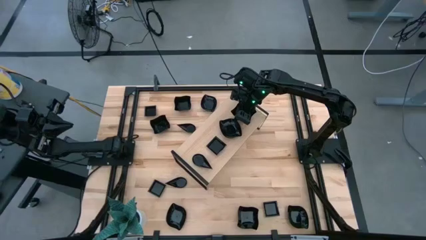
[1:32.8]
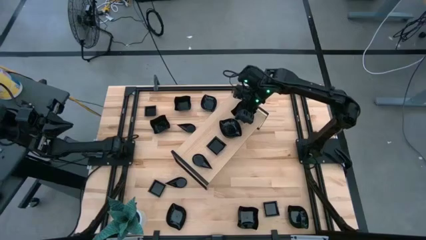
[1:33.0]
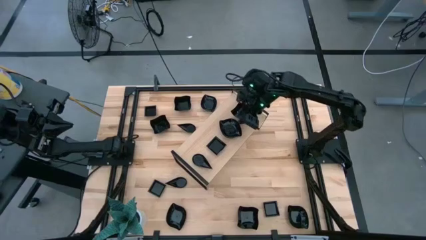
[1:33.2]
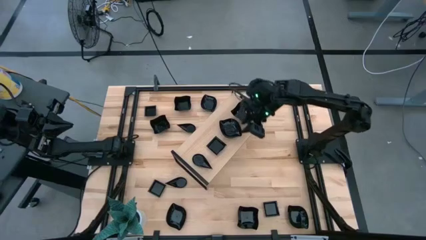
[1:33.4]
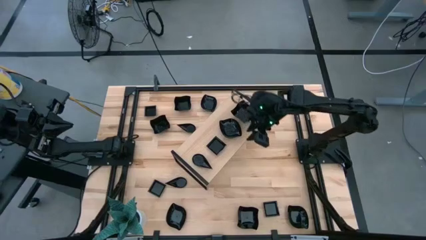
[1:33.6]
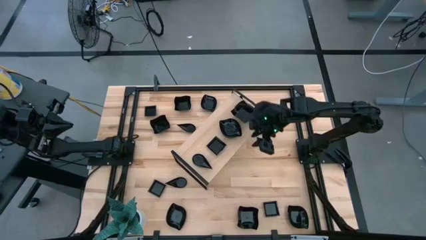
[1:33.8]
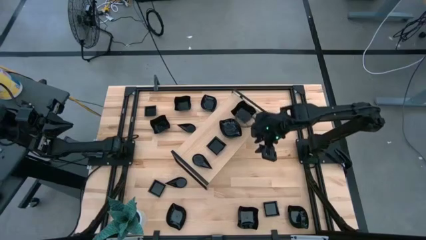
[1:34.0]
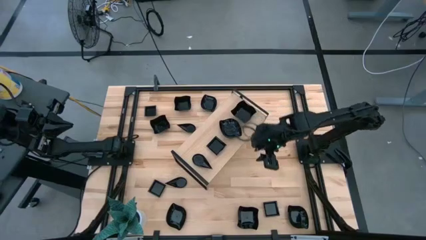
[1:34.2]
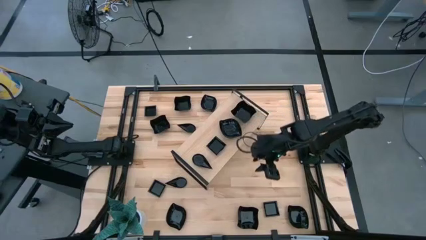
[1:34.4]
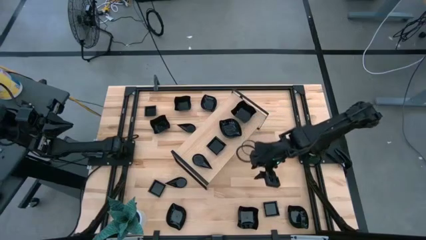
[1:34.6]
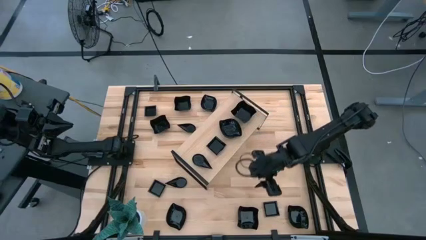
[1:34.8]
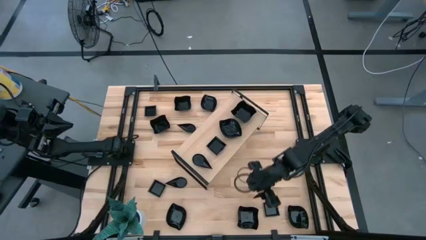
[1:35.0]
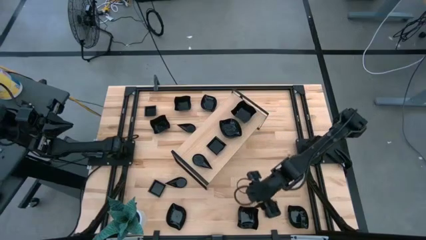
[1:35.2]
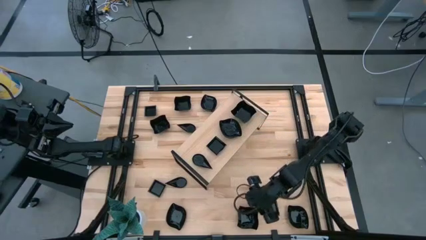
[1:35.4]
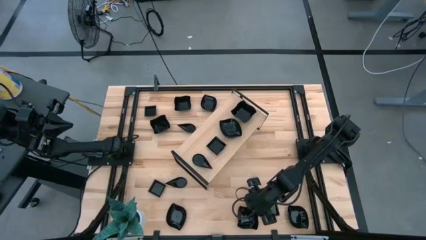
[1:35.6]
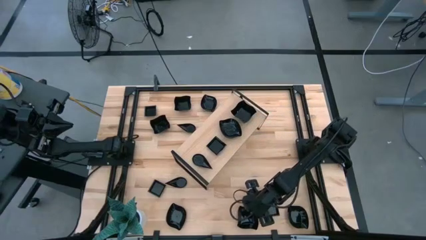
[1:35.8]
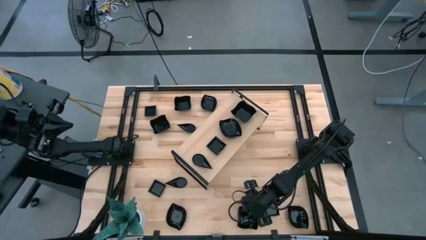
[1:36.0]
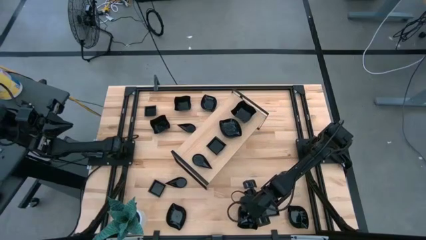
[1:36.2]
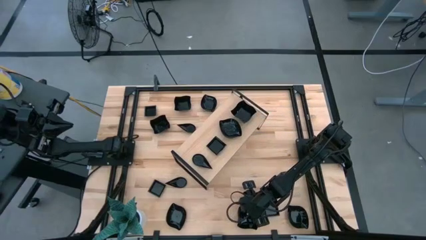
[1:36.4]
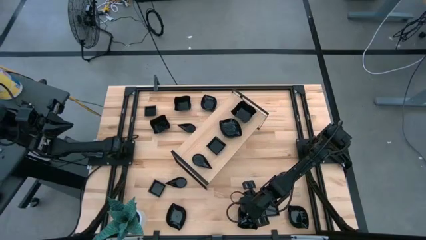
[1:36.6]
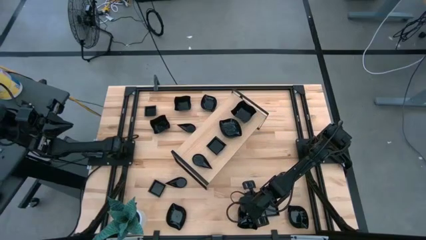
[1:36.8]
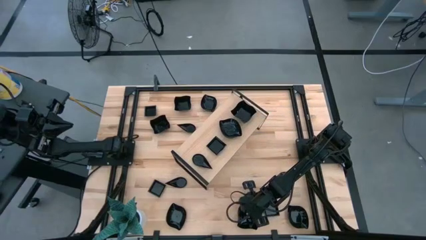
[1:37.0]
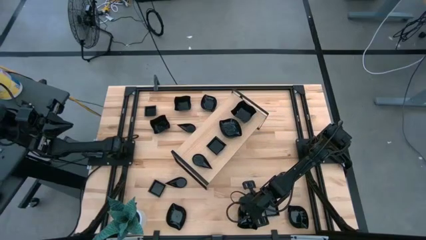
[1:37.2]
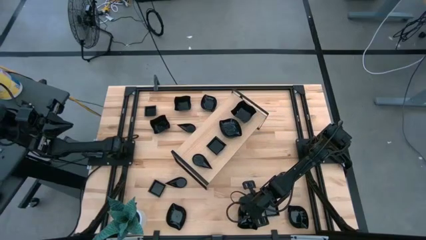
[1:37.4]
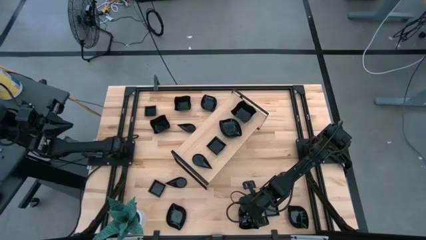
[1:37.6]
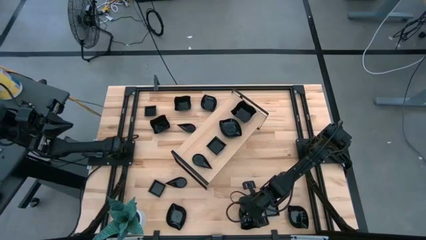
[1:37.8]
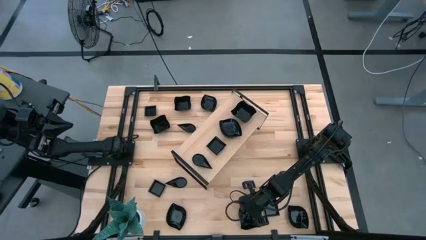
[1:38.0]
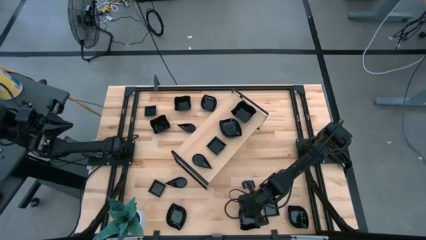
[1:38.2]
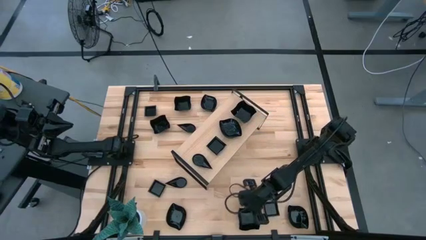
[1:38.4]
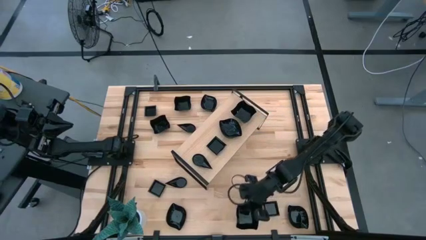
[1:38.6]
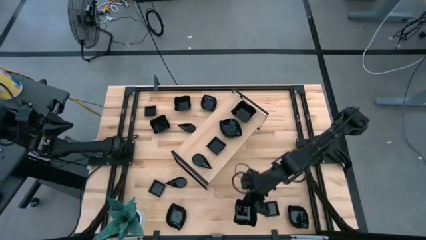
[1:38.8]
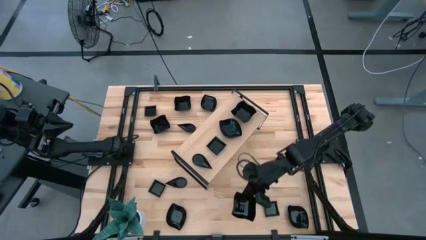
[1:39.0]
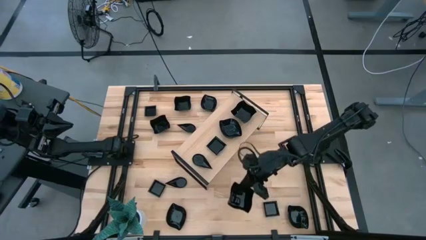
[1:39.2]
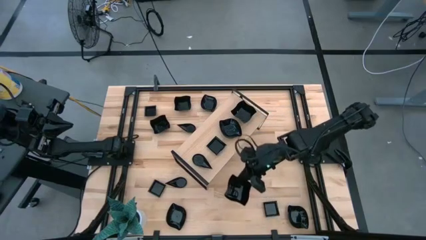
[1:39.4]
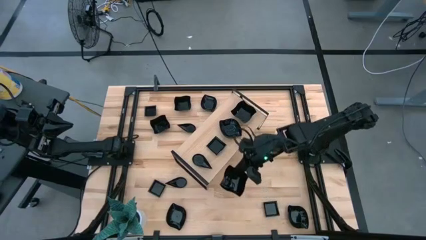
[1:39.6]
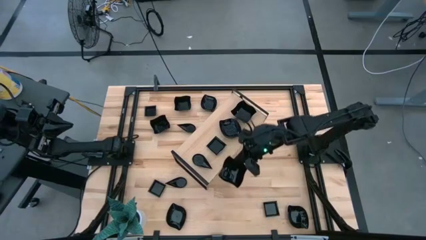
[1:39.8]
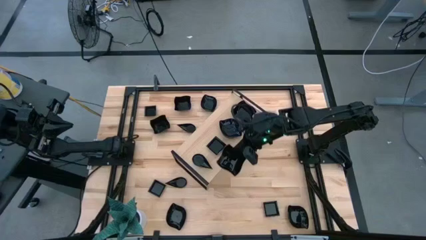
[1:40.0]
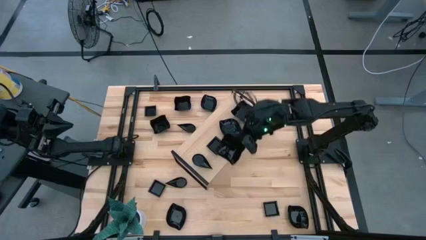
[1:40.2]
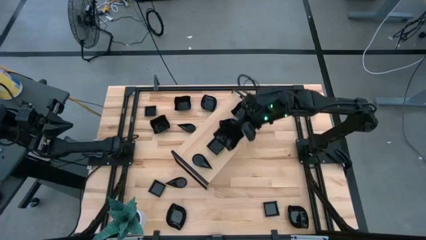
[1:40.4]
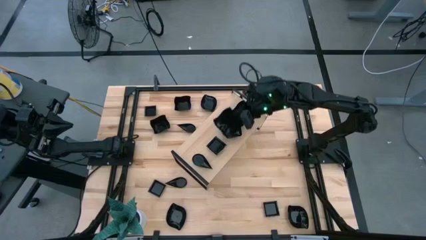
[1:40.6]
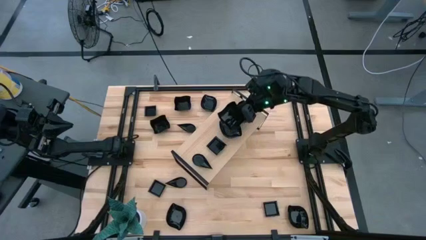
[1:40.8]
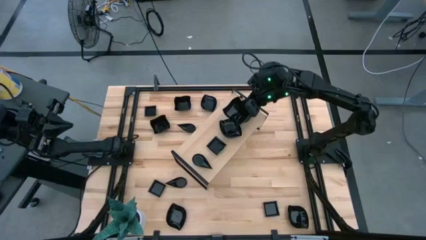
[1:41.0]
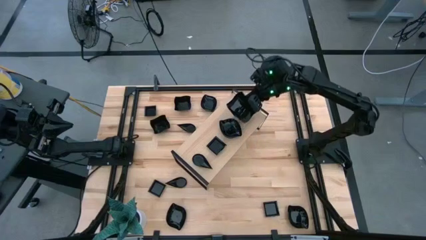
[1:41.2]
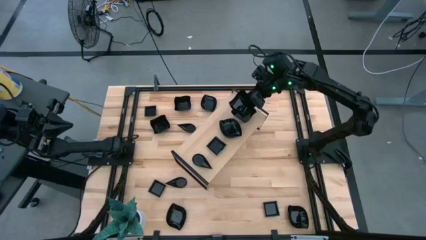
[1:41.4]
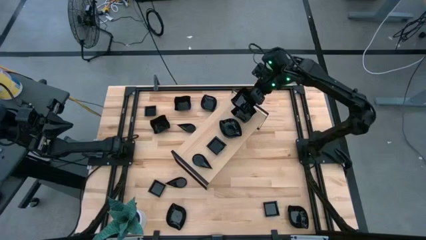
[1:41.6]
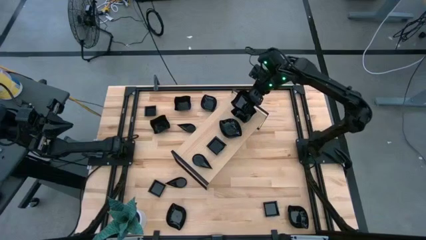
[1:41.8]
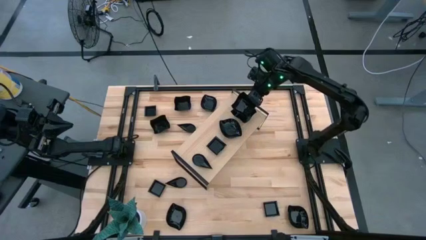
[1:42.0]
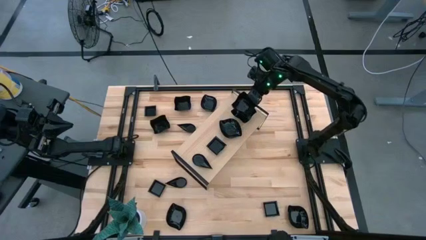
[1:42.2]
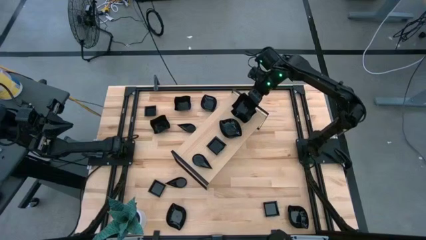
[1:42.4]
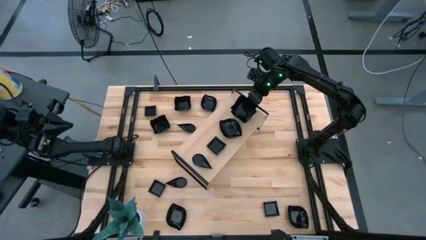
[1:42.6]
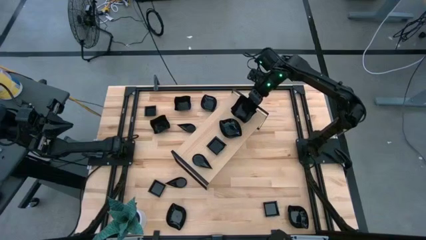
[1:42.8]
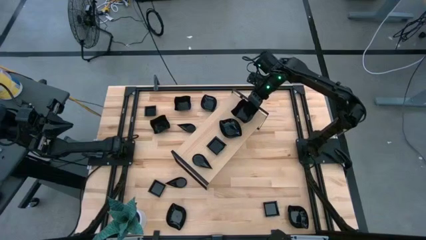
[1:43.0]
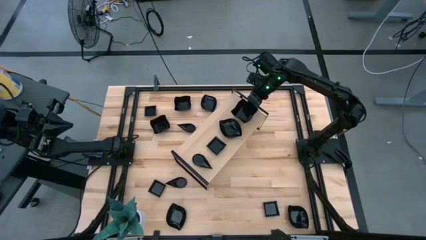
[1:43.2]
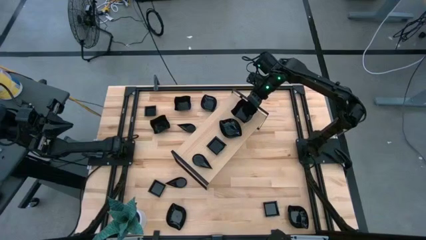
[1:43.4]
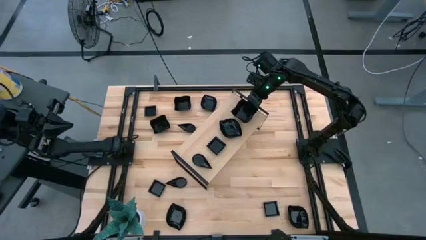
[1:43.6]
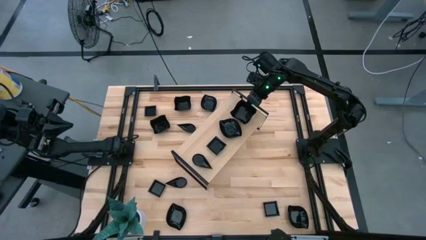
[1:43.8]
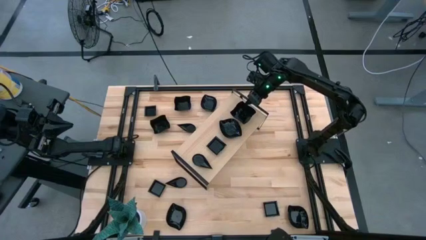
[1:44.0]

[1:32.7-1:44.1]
Task: Pick & Place Mini shaped plates
Stack the black wave square shaped bowl on top of the black wave square shaped bowl on the shelf
